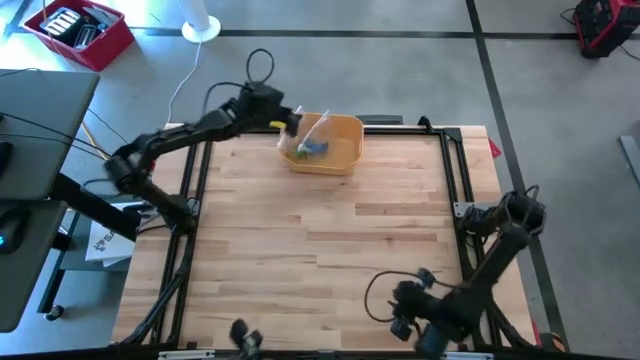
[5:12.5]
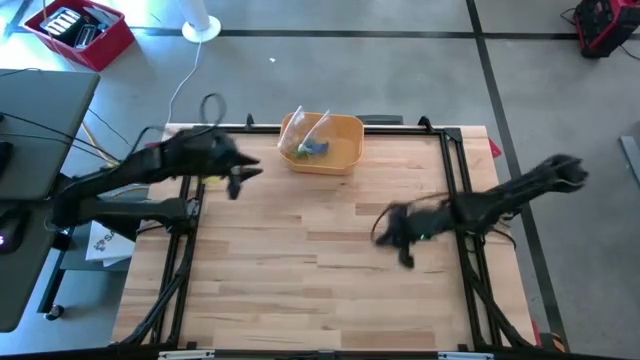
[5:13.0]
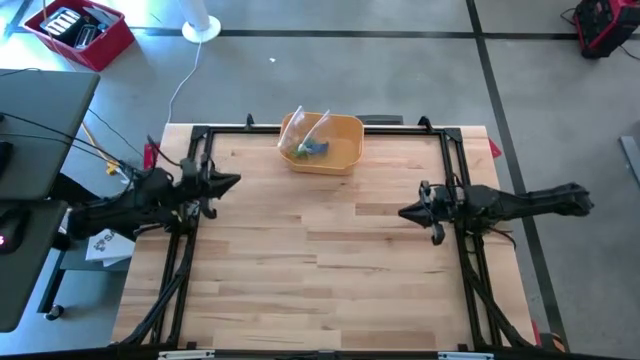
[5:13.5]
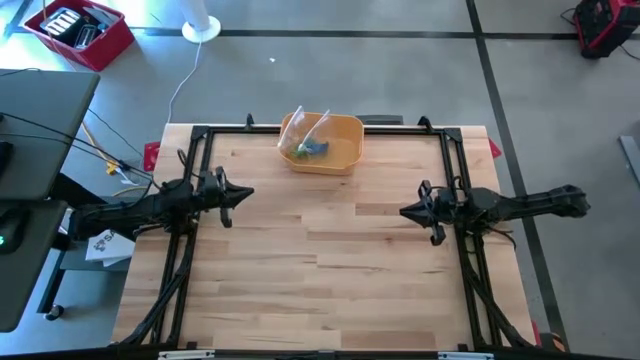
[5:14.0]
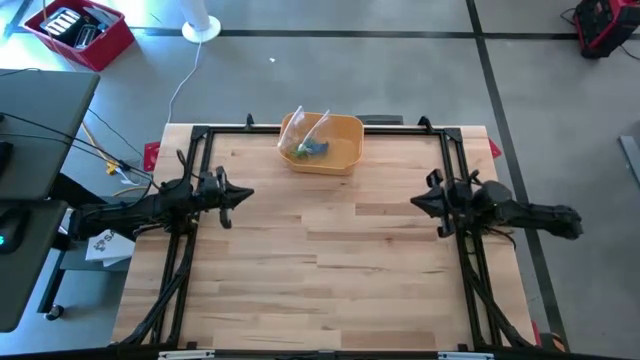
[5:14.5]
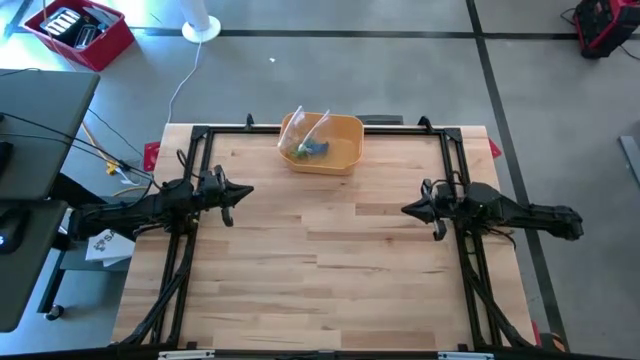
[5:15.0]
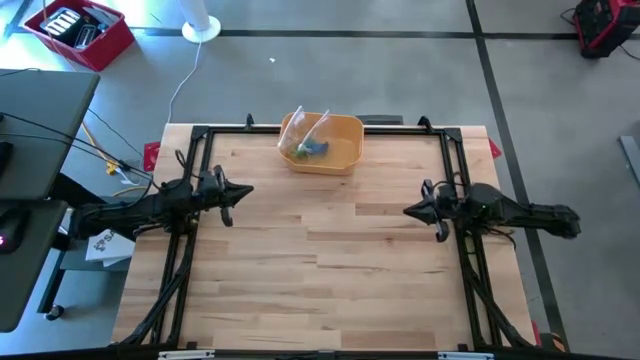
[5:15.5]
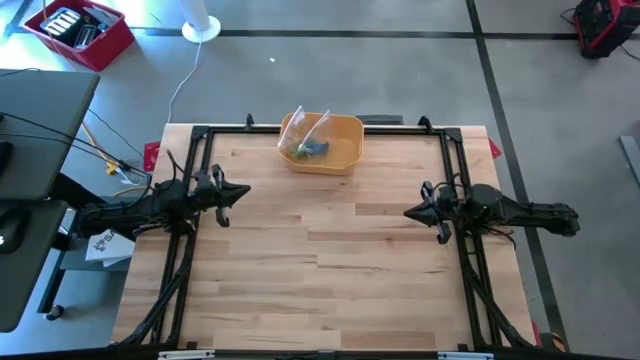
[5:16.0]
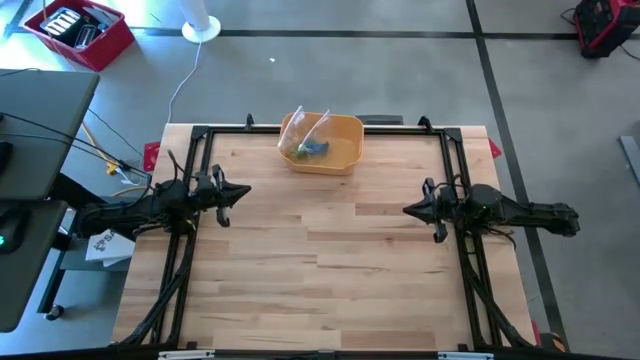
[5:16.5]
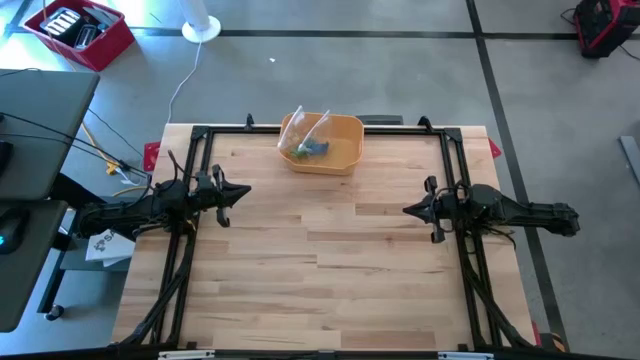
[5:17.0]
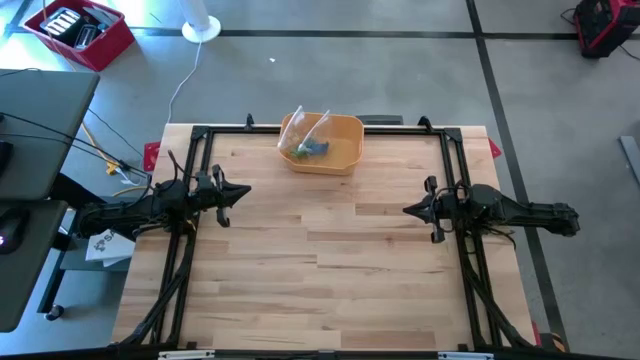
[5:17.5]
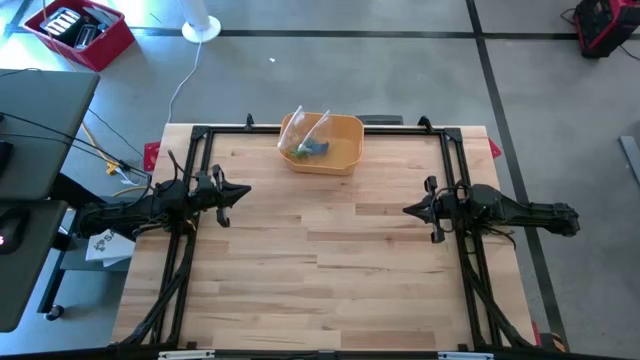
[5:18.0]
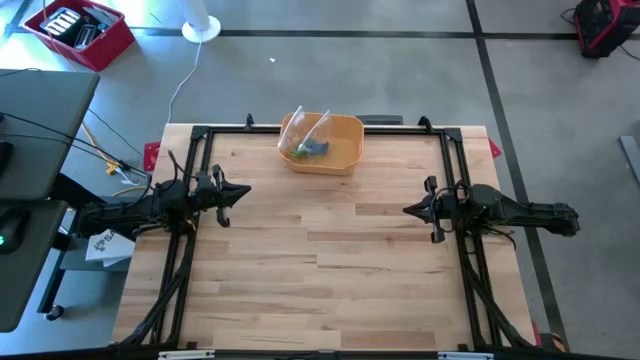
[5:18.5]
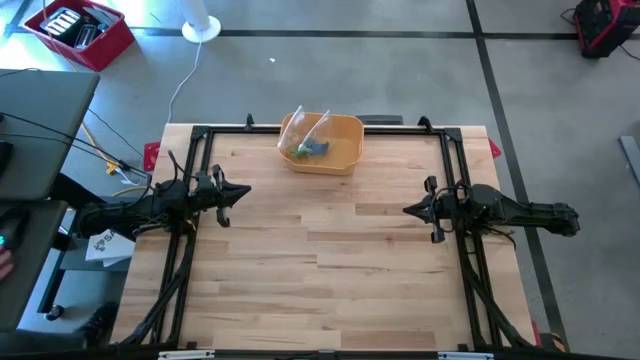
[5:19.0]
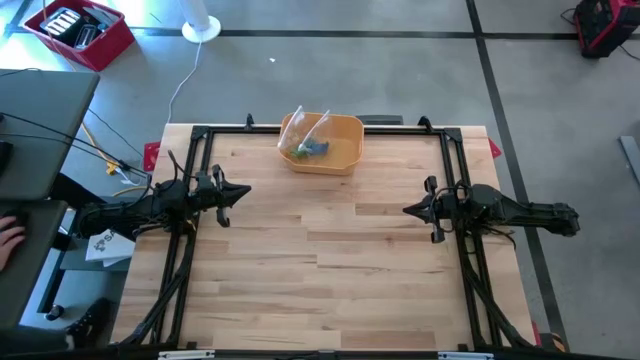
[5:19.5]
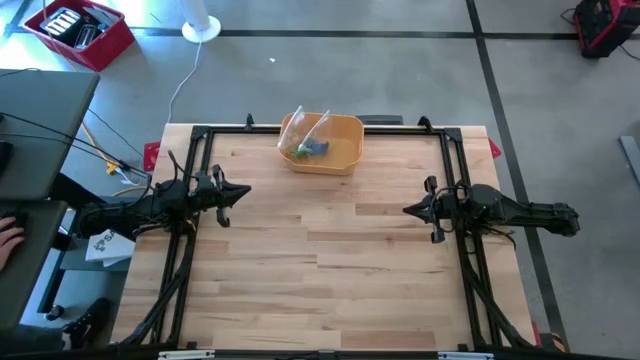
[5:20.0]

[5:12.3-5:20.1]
Task: Roll bandage
Return to Home Position

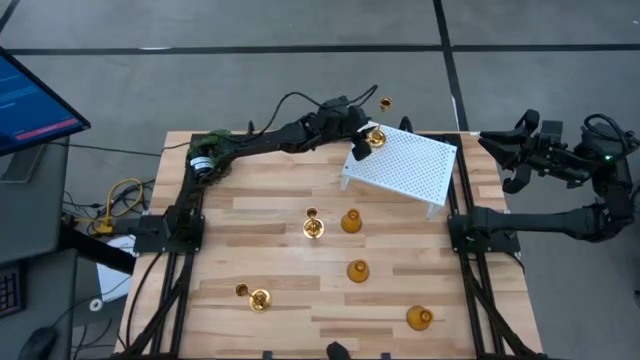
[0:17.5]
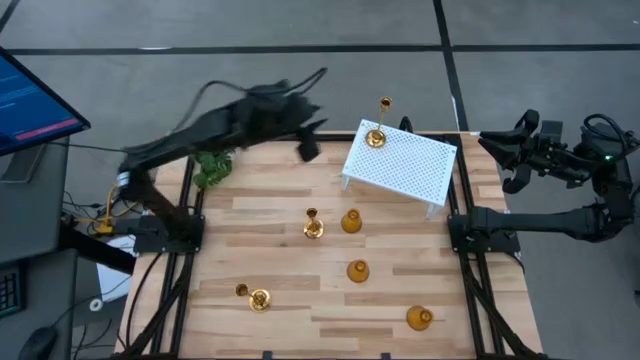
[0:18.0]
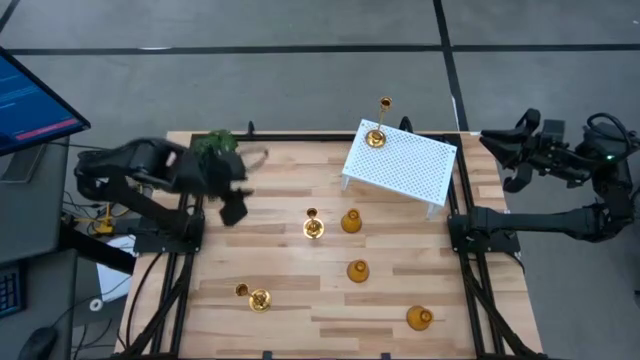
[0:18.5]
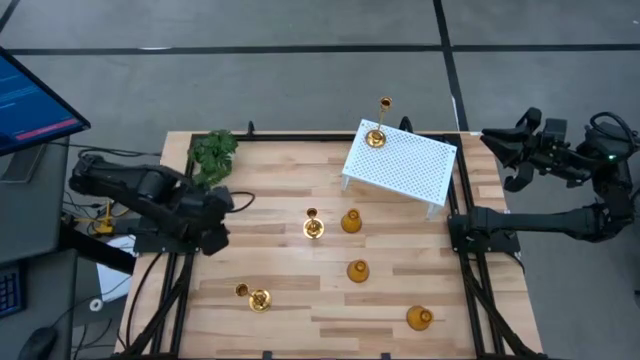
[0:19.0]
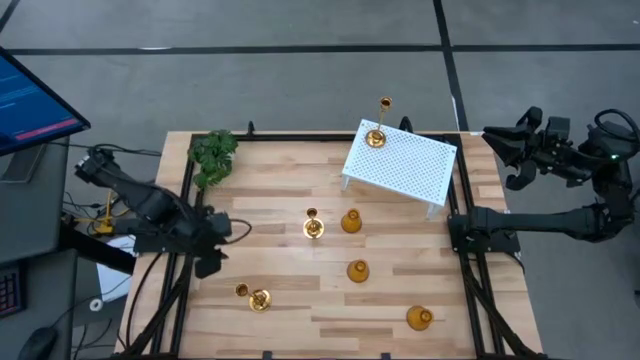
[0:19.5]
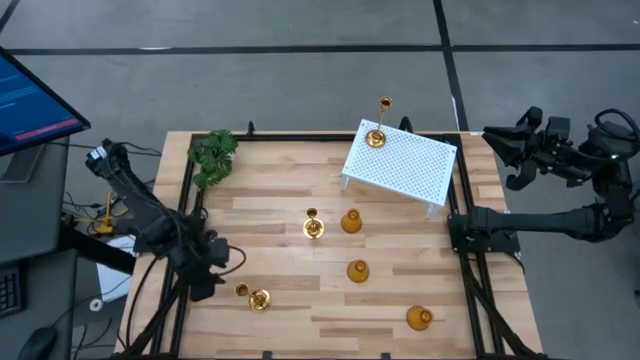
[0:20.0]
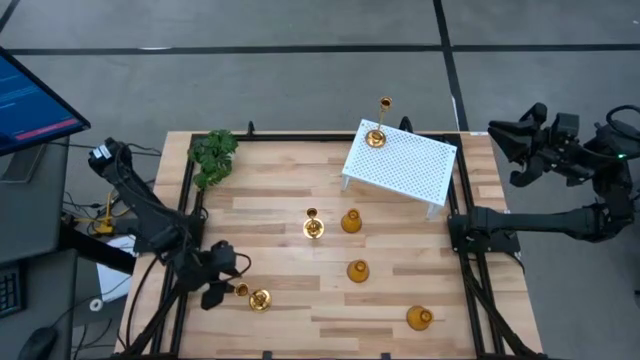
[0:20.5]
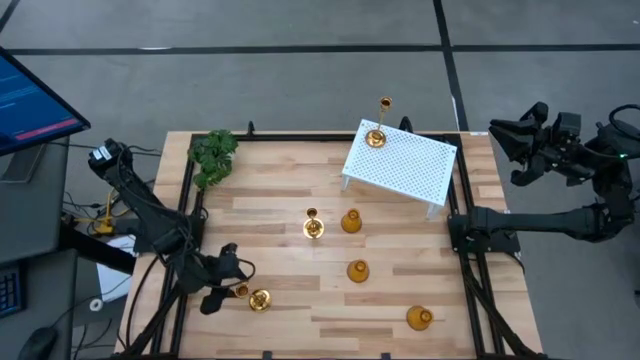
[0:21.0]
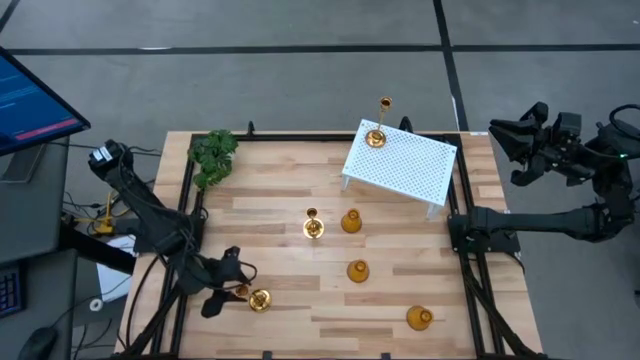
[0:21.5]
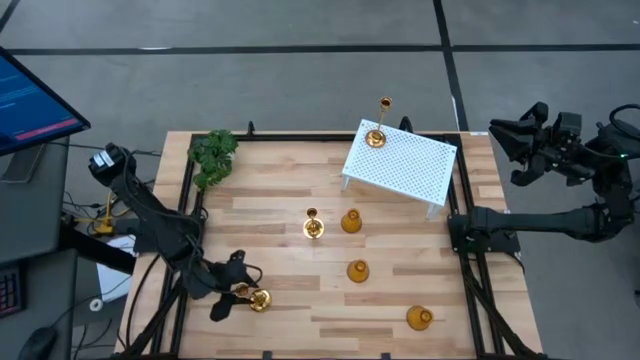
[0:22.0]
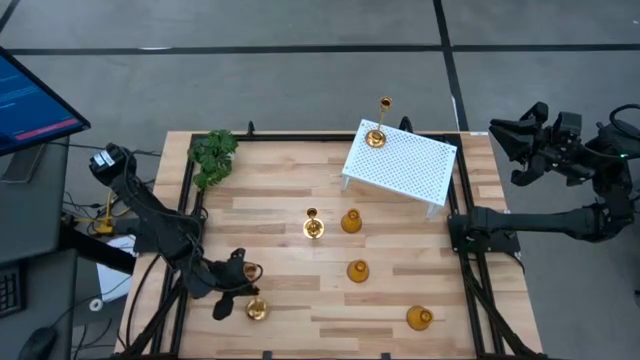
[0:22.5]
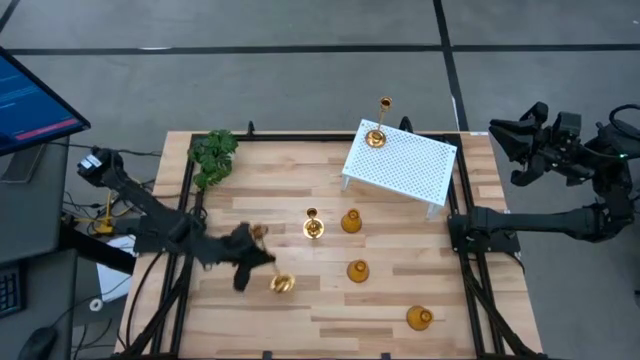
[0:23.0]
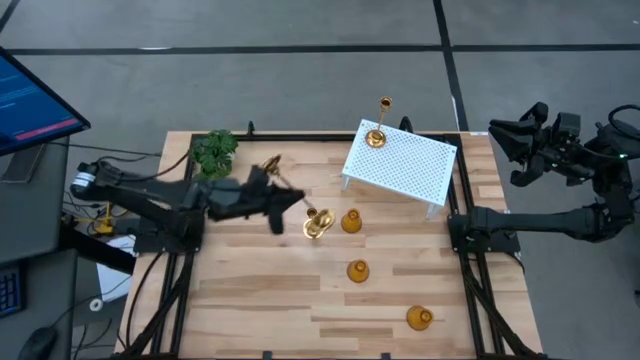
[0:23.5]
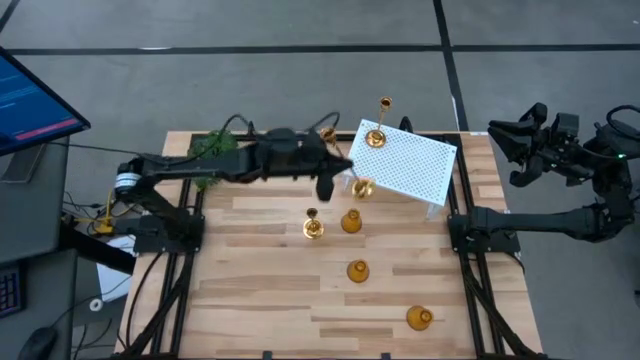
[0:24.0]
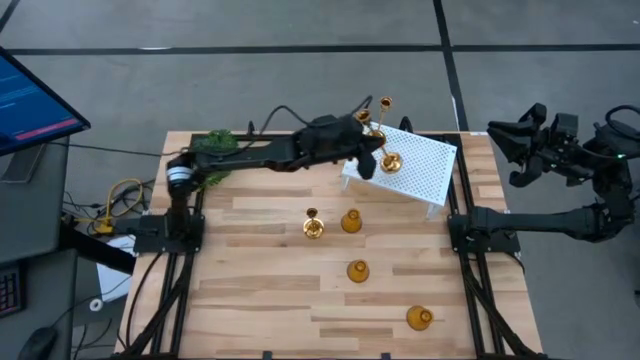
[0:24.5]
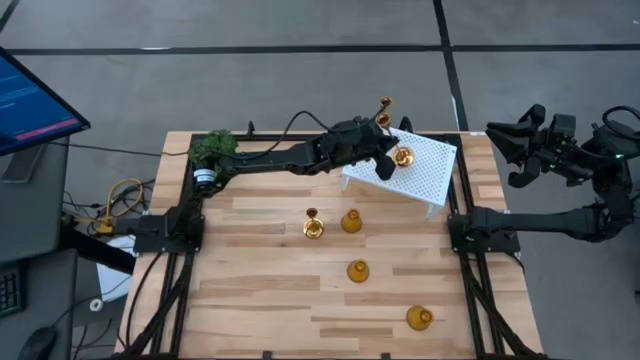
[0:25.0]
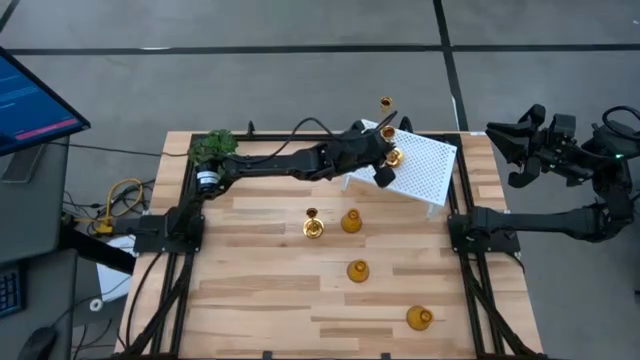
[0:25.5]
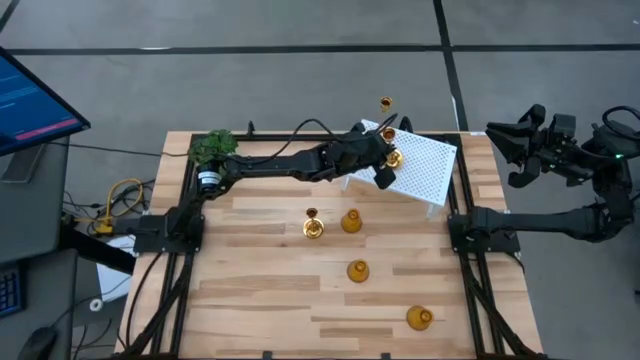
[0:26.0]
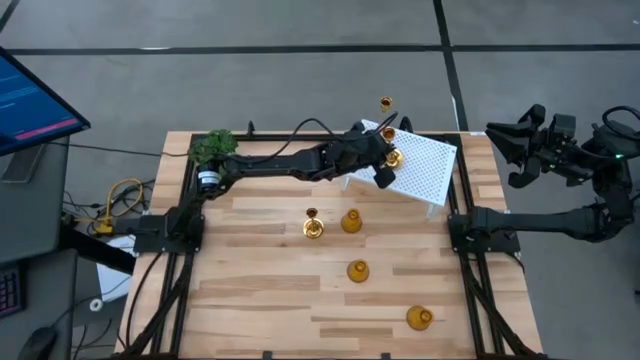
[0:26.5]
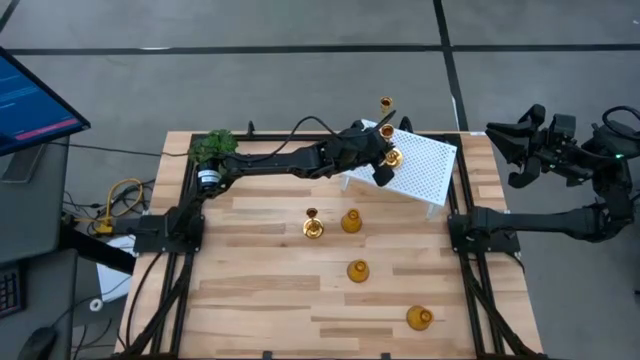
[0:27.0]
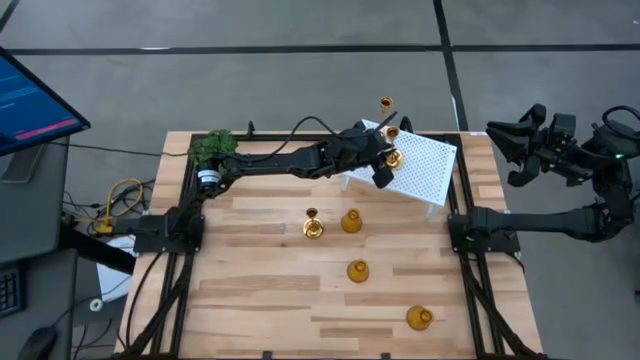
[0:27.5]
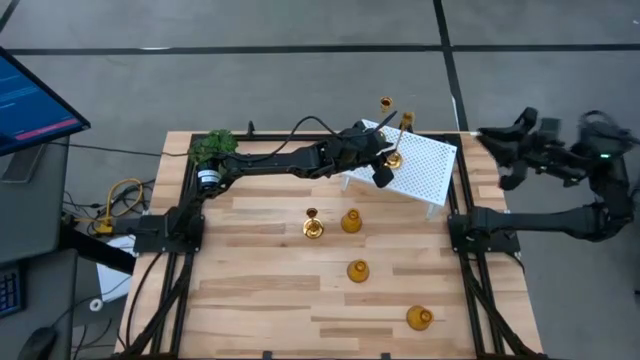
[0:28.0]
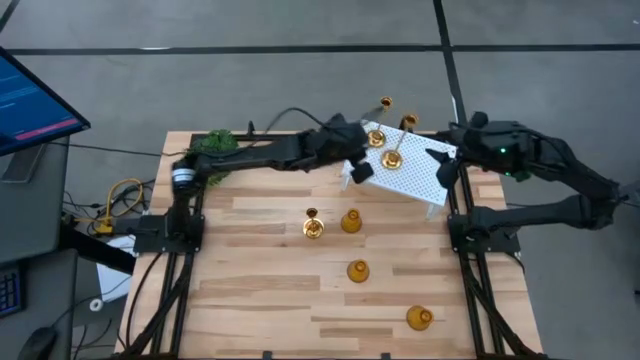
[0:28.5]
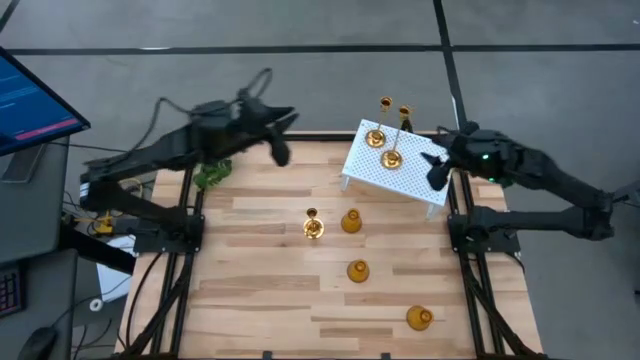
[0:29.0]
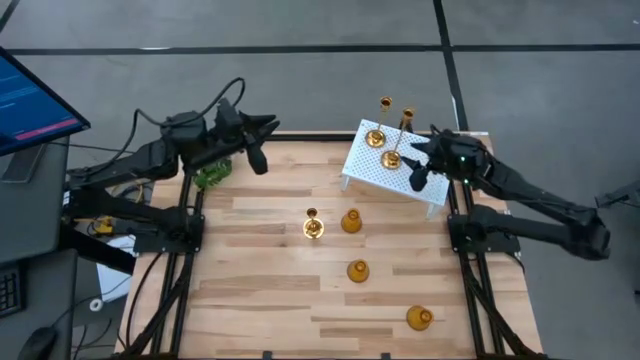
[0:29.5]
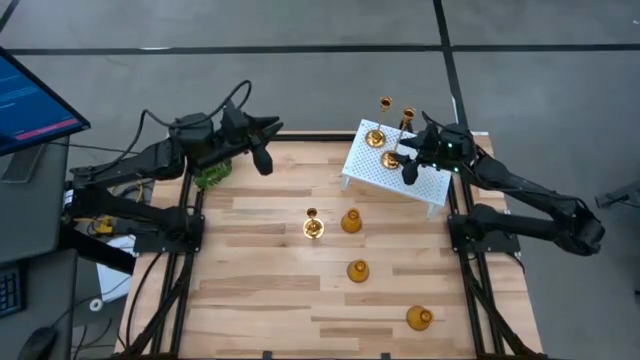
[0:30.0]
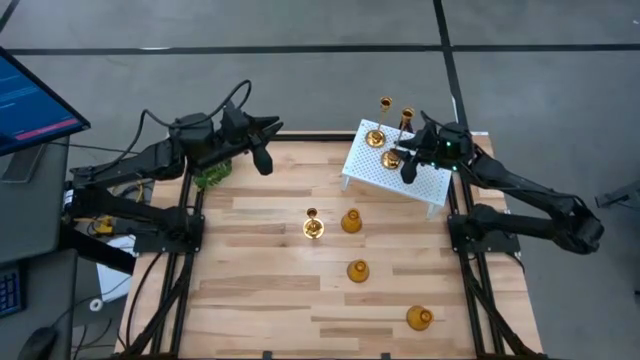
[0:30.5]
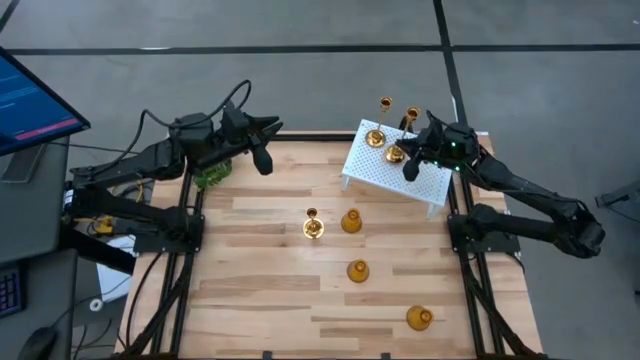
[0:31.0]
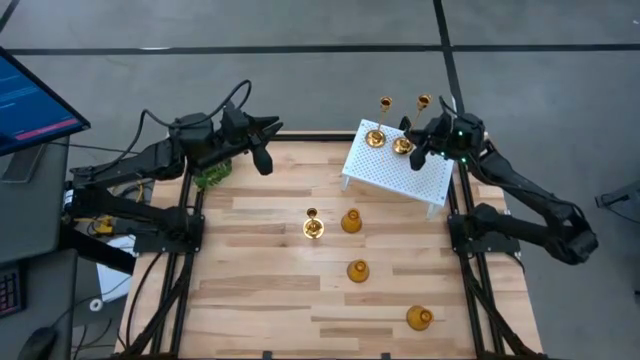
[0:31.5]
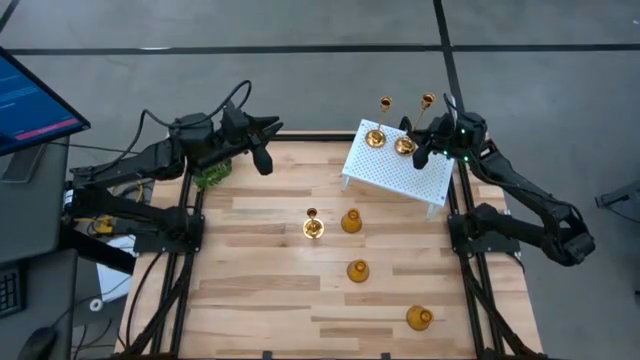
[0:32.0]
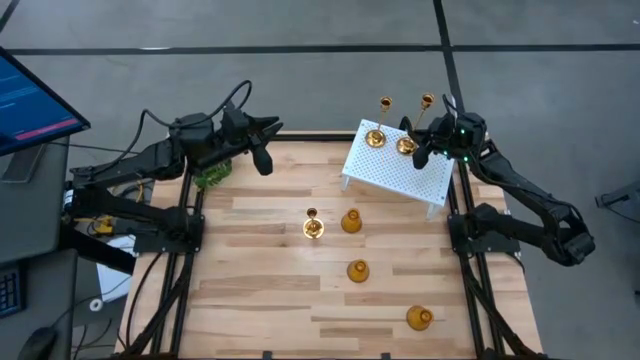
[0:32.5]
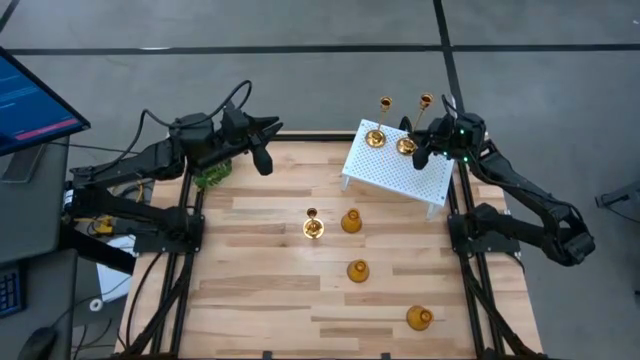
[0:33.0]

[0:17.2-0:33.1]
Task: Pick & Place candle stick holders
Put the bottom gold candle holder on the shelf aligned with the other gold candle holder
